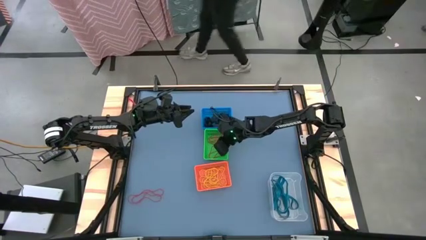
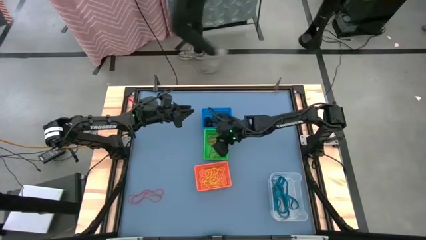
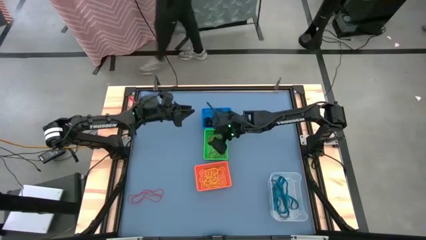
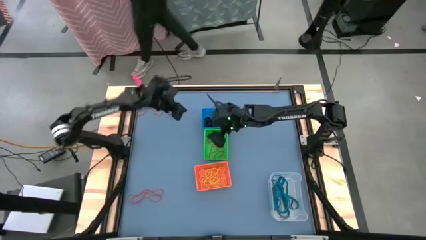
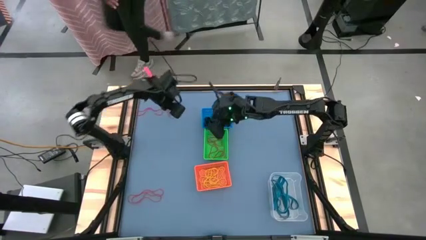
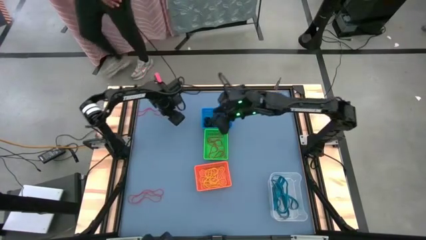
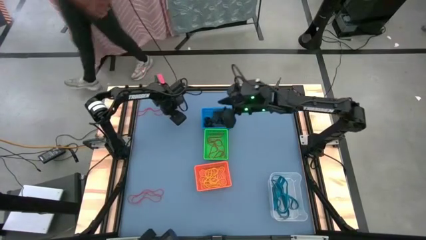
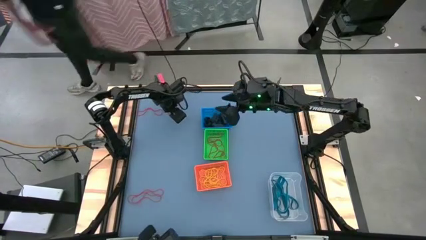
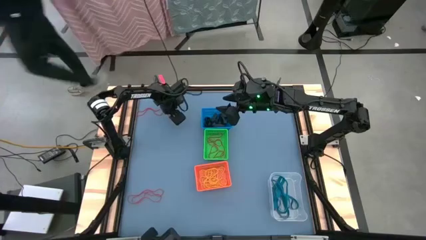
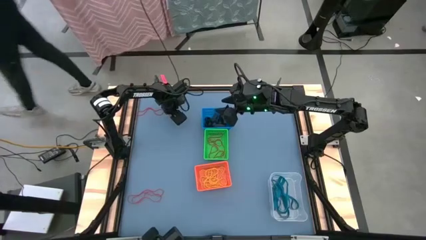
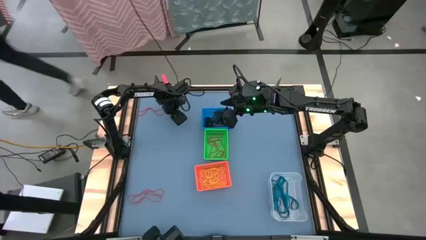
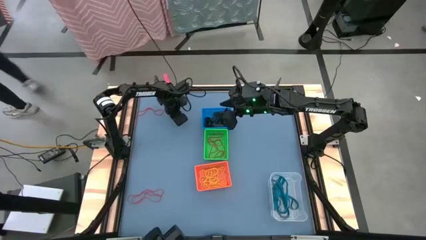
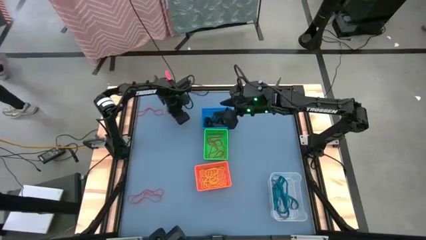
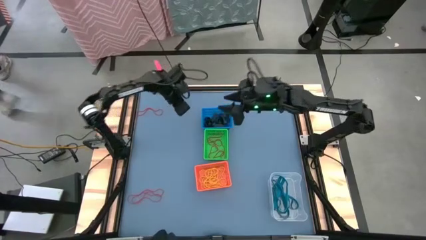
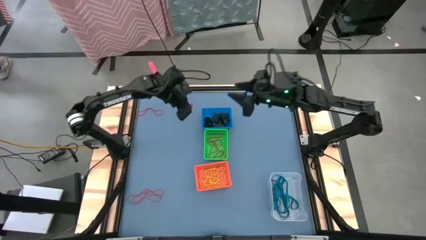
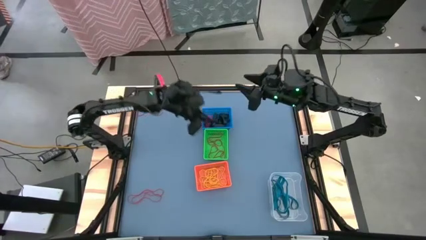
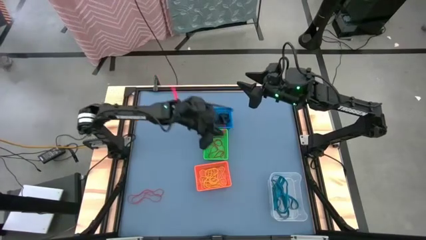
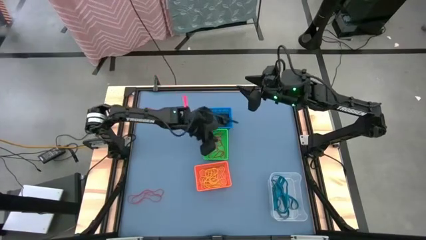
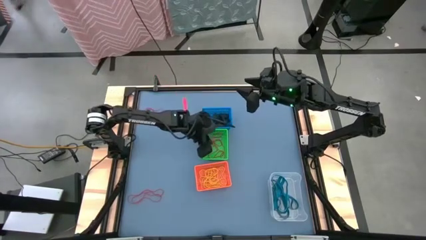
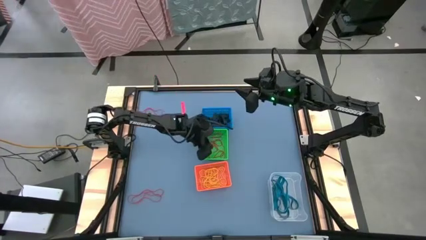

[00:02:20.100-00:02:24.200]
Task: Sort rubber bands into baskets
Put the red rubber band into the green bin

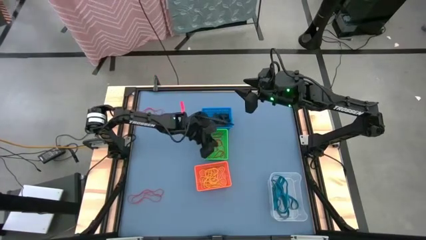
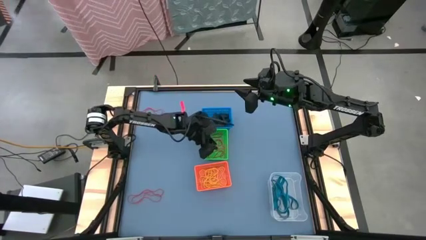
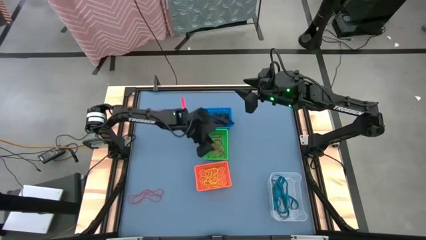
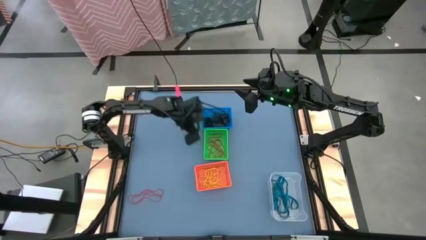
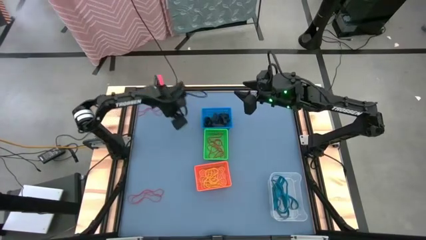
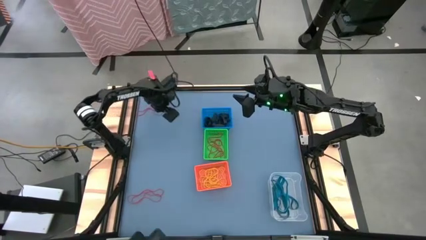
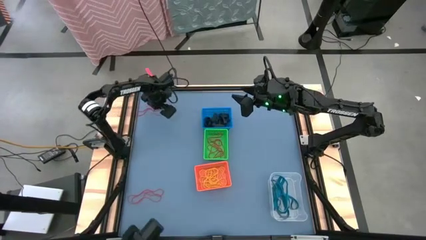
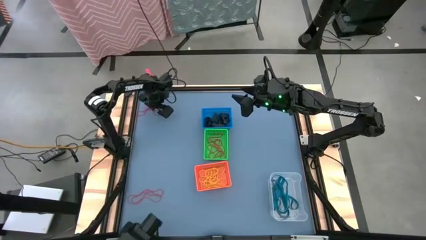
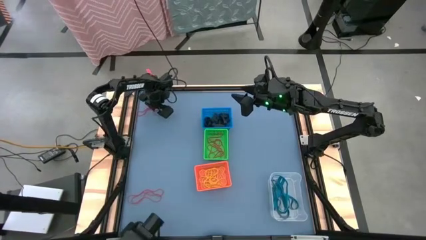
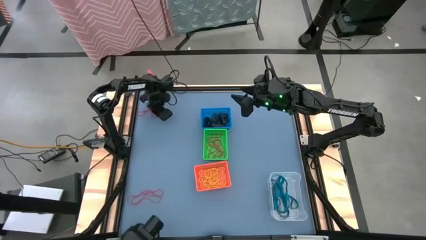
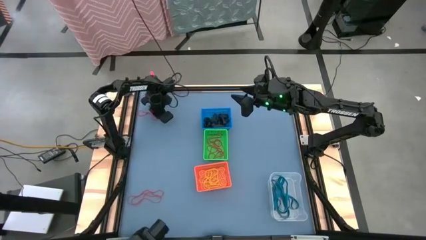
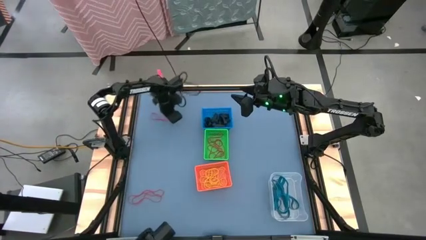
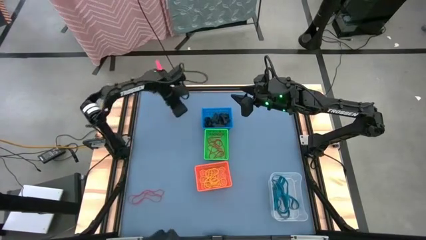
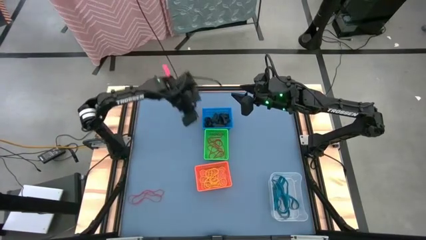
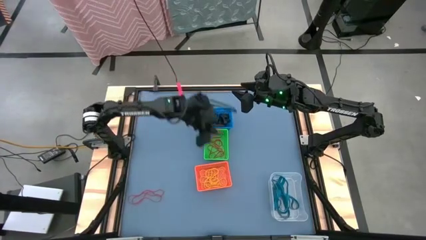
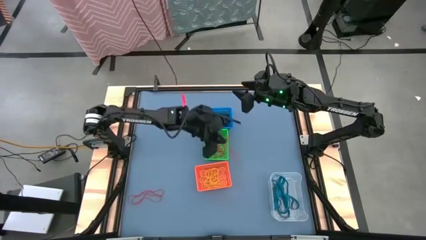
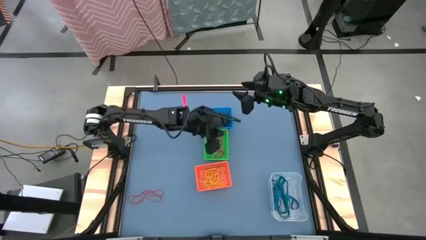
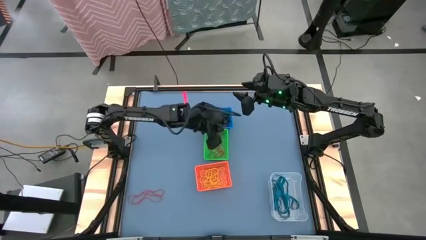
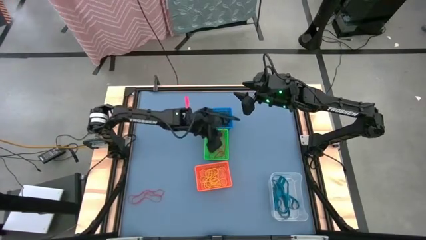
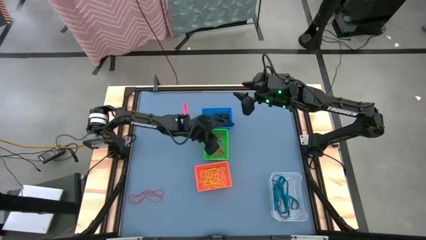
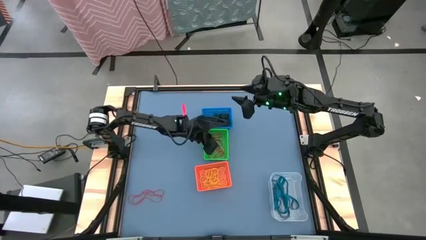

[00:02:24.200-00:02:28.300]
Put the red rubber band into the green bin

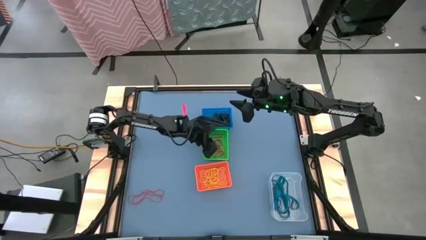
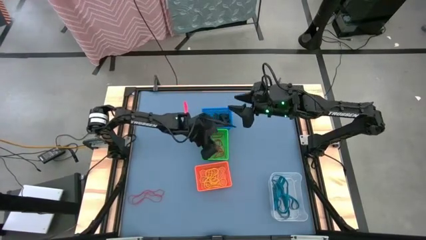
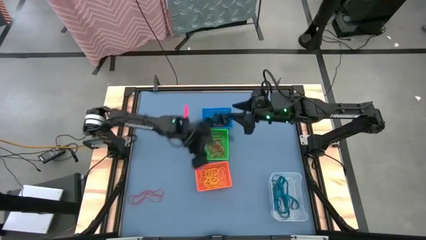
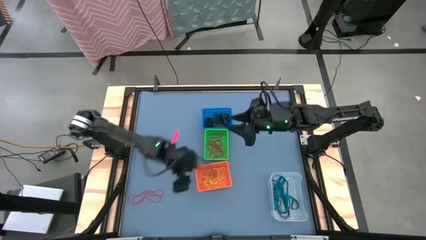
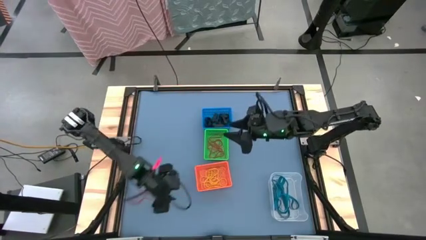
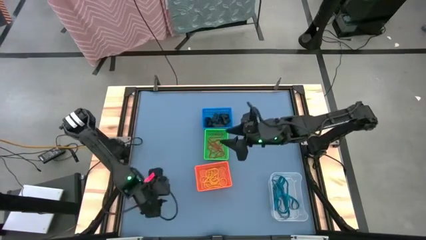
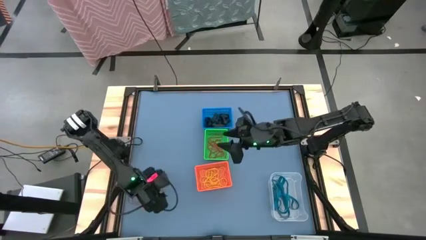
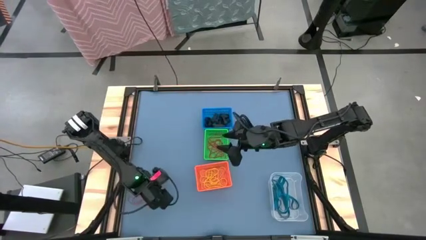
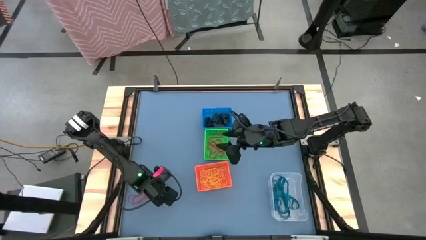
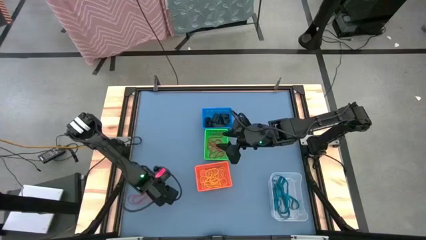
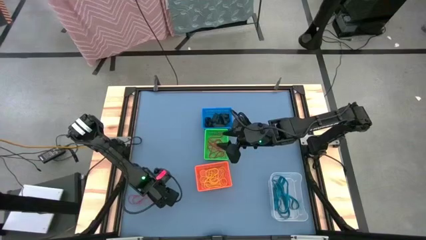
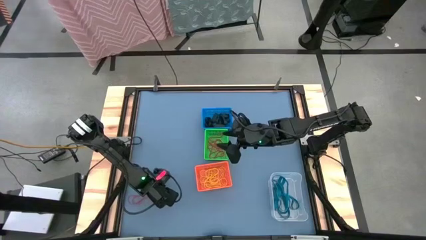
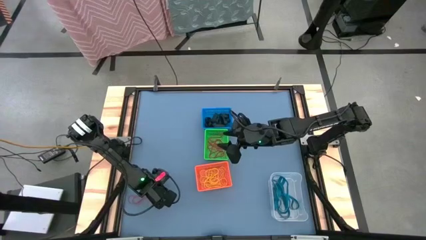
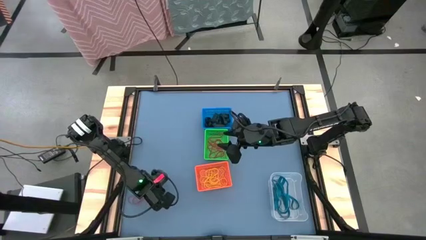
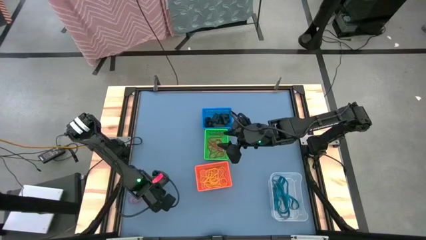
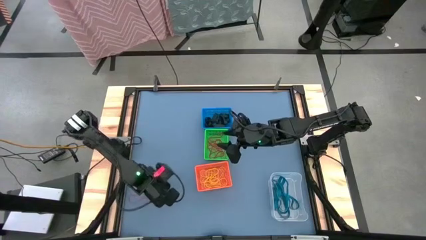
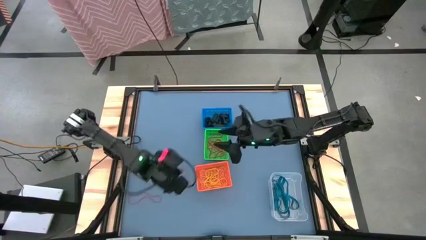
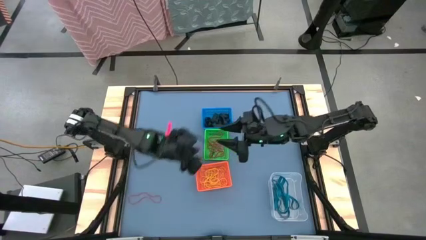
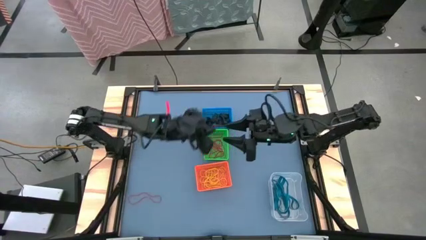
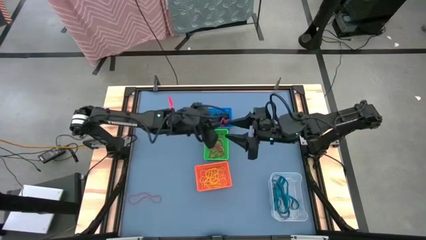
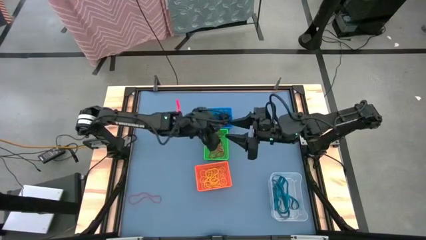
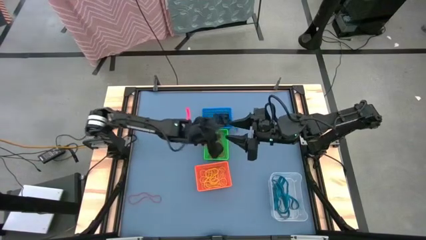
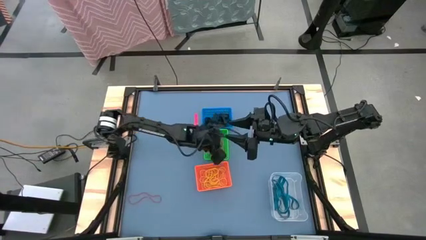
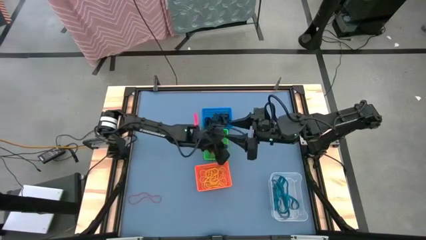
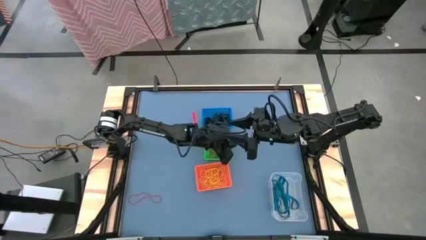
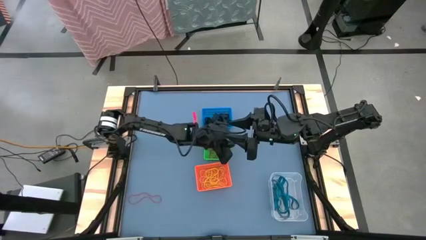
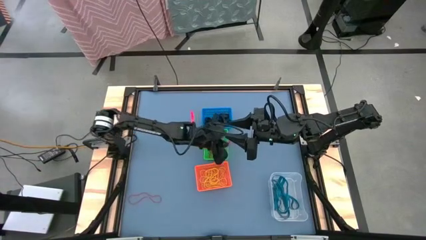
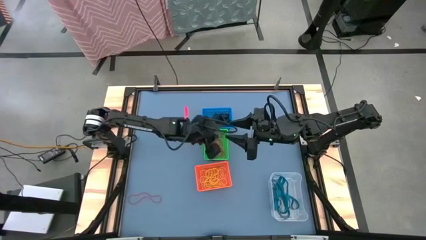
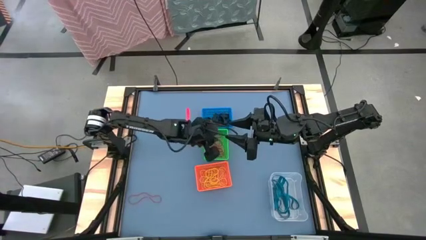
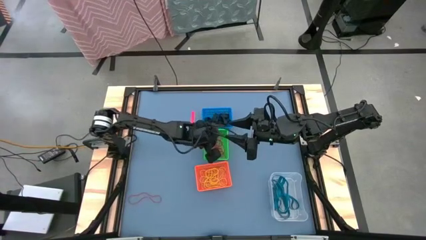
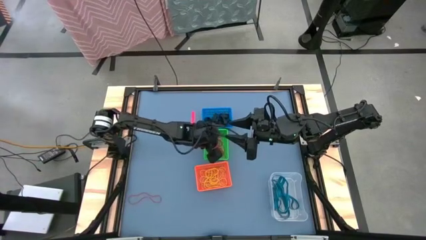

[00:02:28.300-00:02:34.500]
Put the red rubber band into the green bin

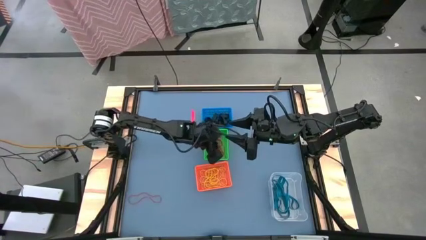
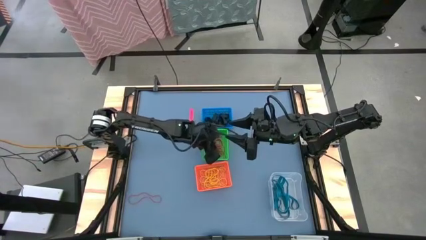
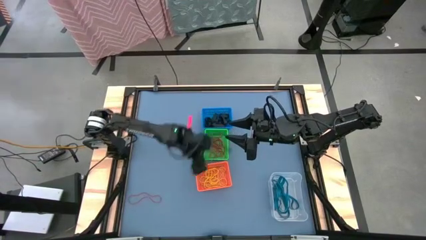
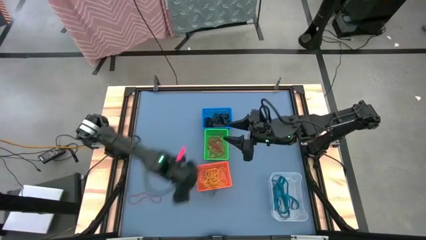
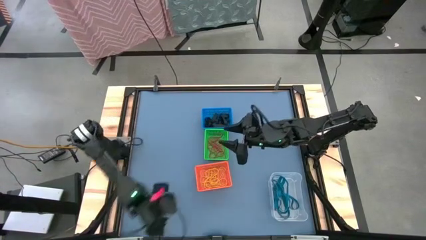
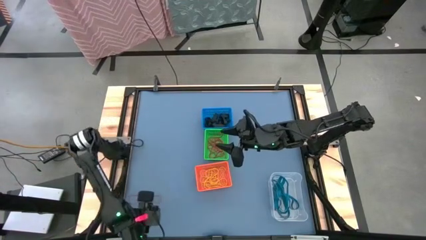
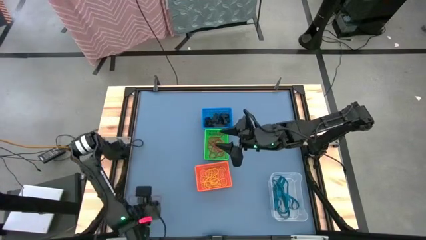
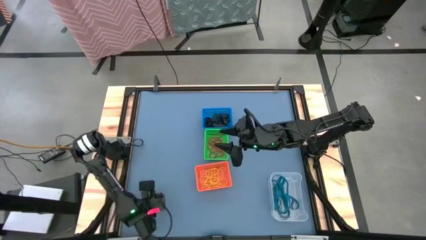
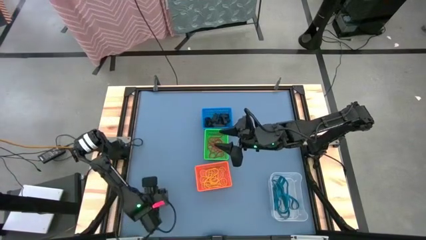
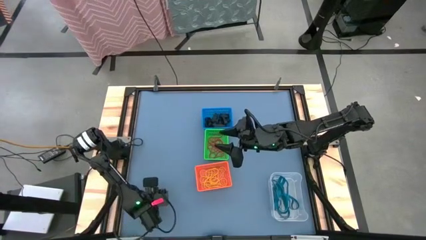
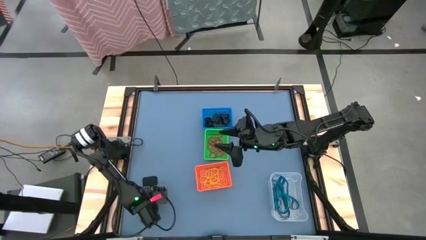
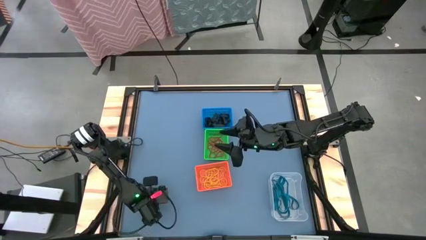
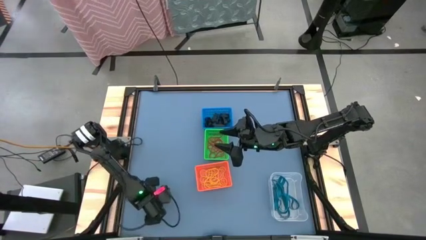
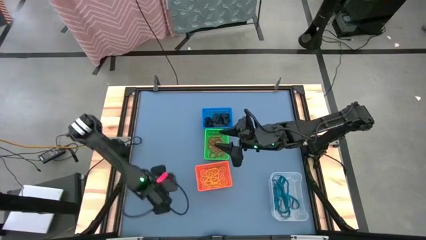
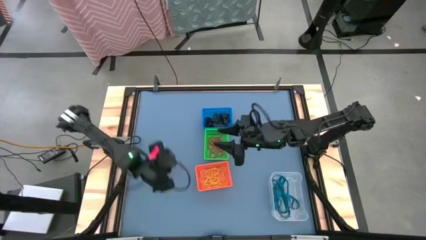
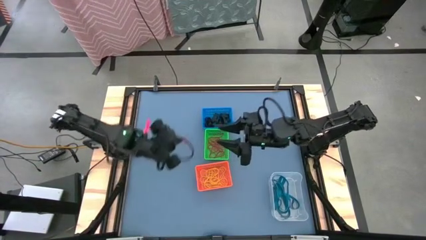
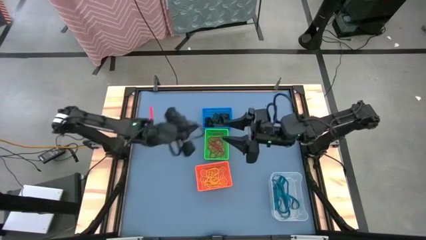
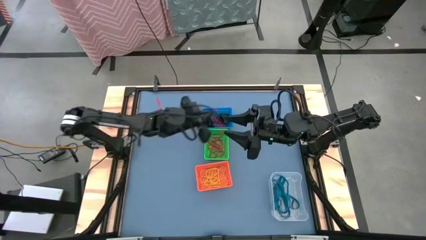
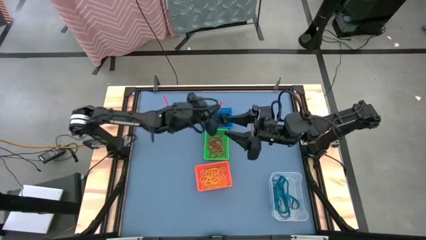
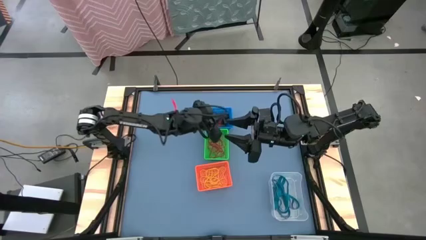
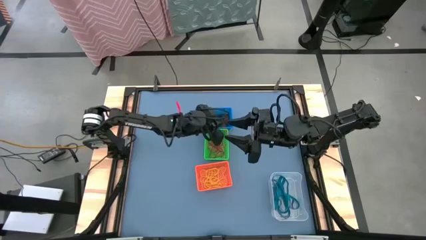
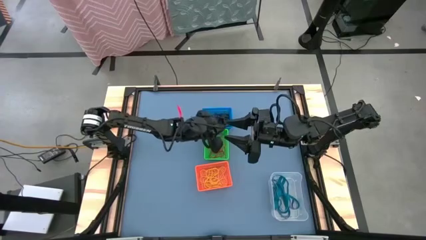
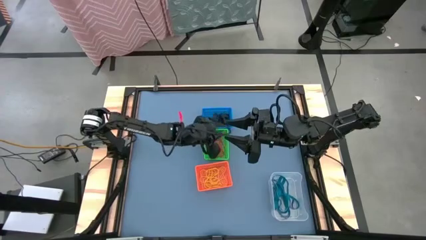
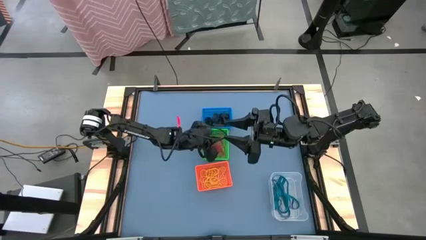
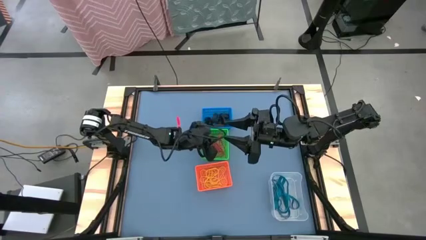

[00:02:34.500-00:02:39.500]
Put the red rubber band into the green bin
